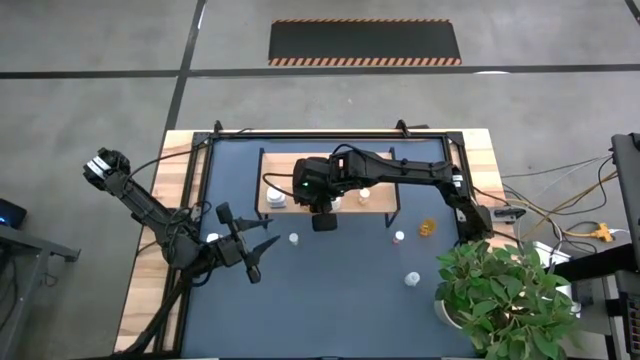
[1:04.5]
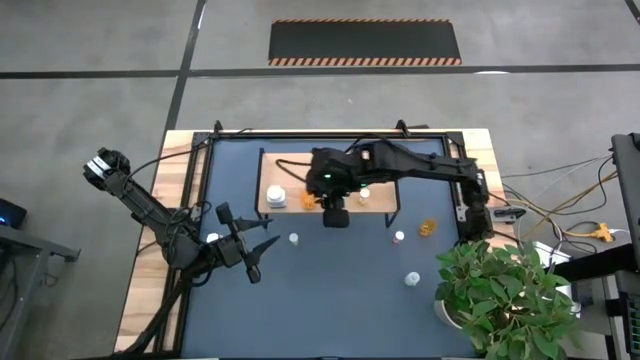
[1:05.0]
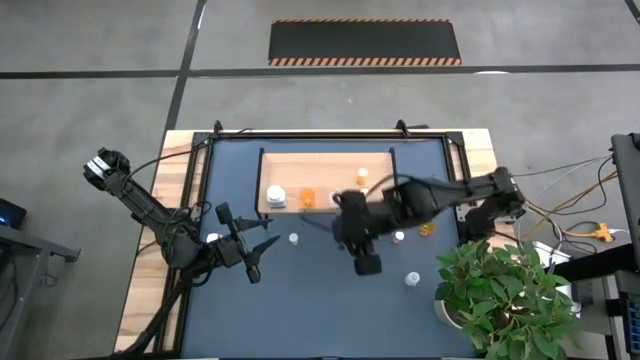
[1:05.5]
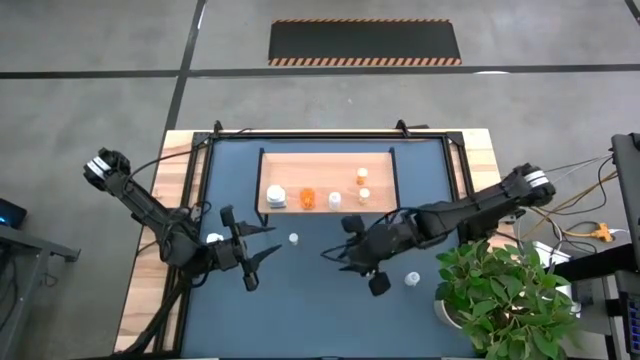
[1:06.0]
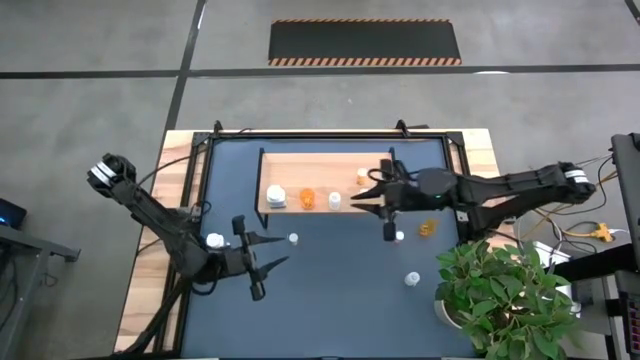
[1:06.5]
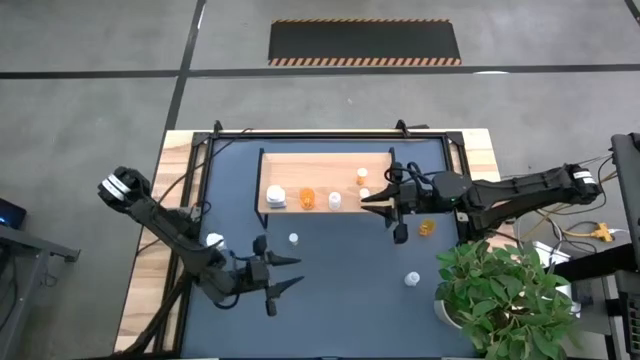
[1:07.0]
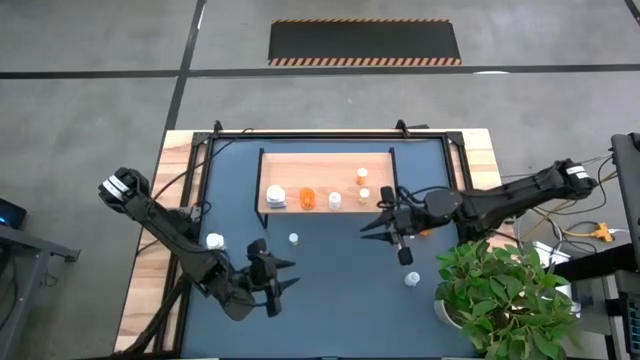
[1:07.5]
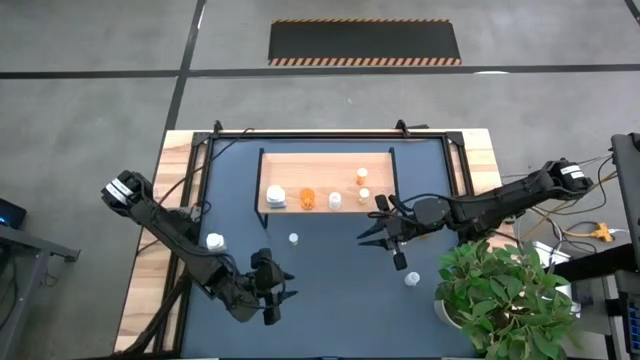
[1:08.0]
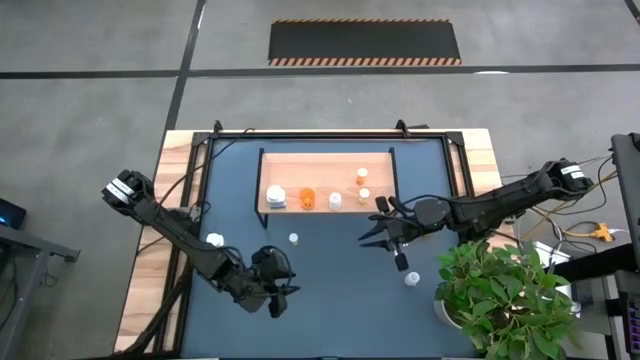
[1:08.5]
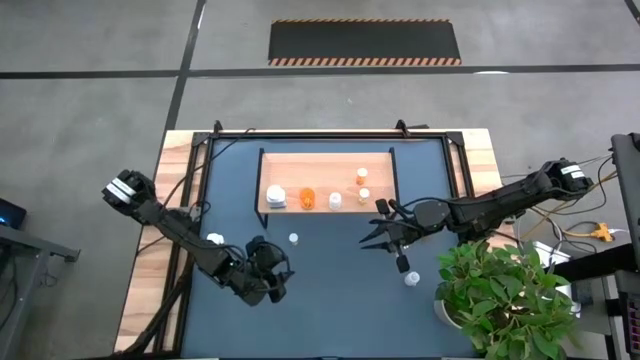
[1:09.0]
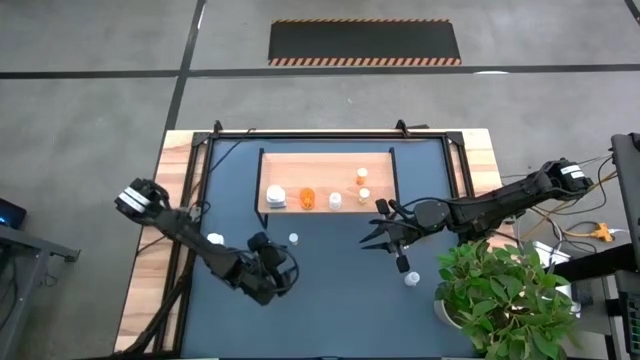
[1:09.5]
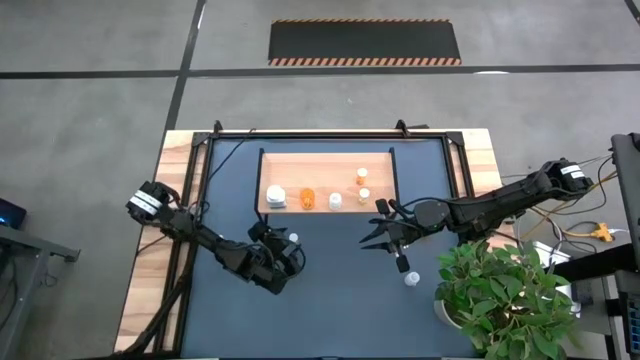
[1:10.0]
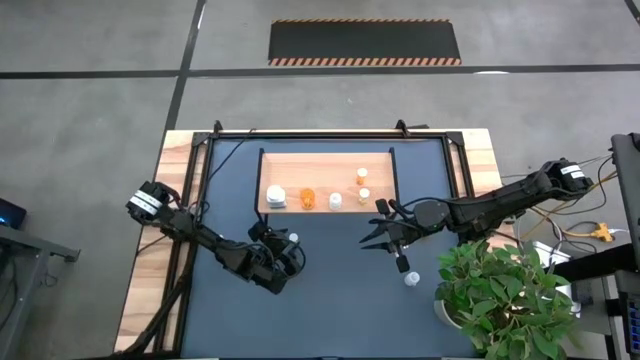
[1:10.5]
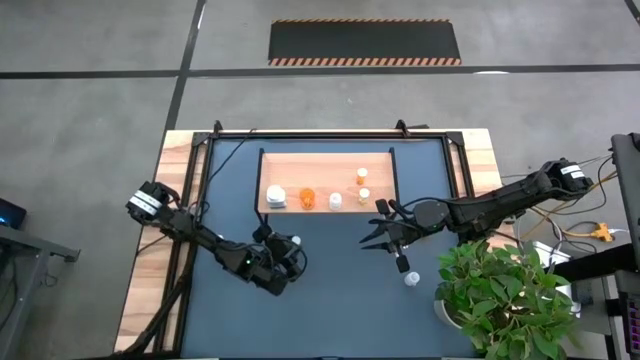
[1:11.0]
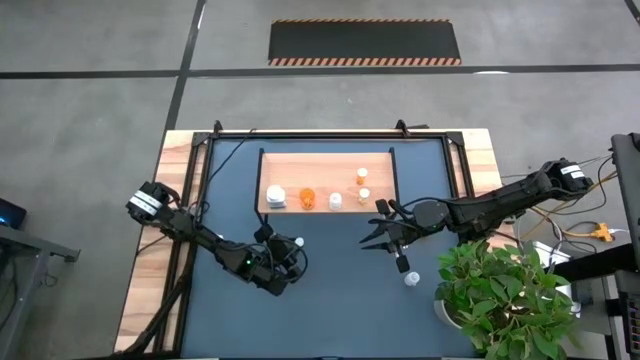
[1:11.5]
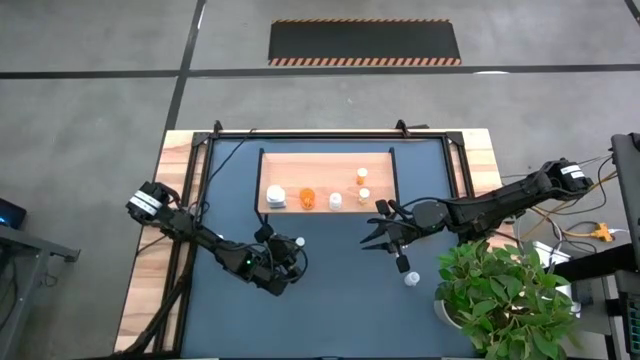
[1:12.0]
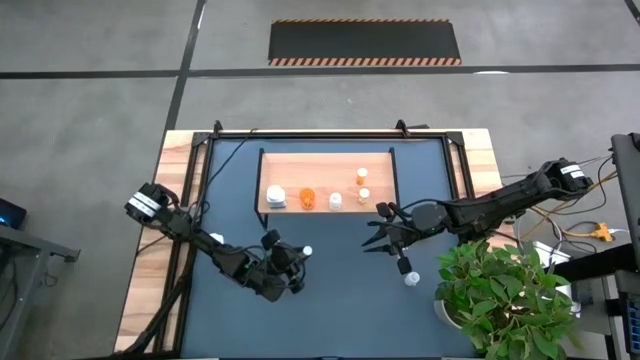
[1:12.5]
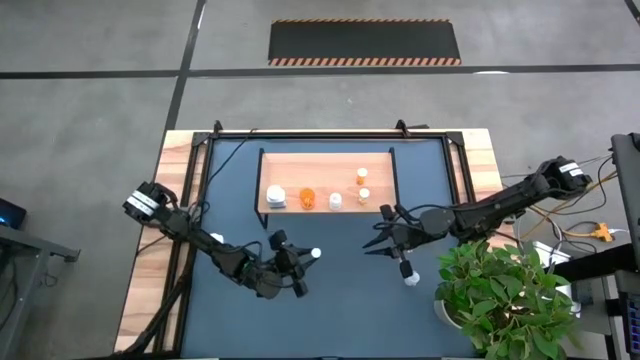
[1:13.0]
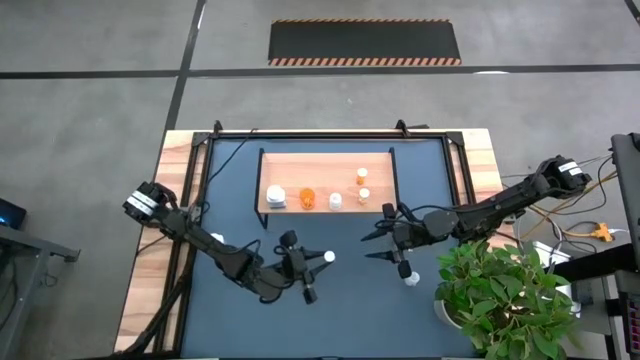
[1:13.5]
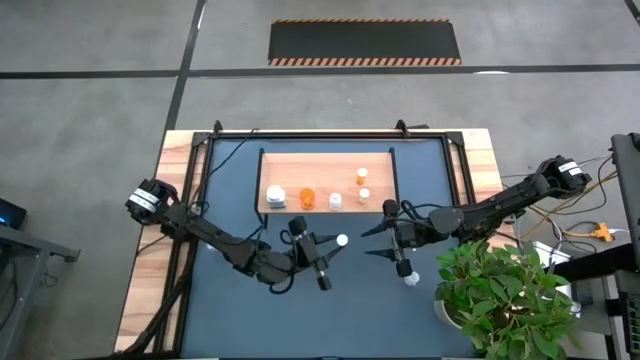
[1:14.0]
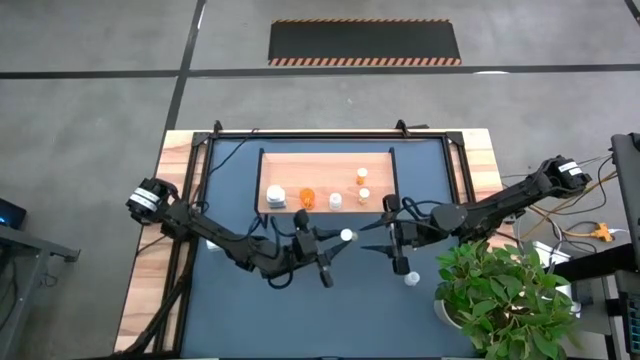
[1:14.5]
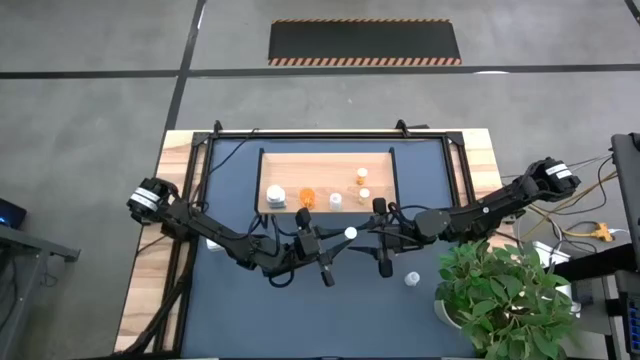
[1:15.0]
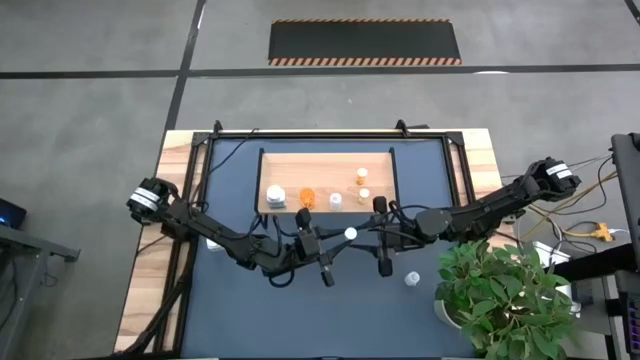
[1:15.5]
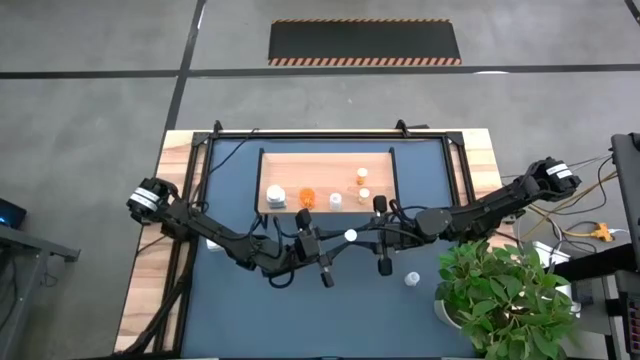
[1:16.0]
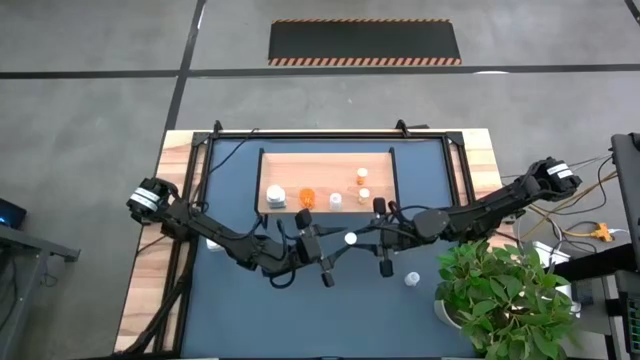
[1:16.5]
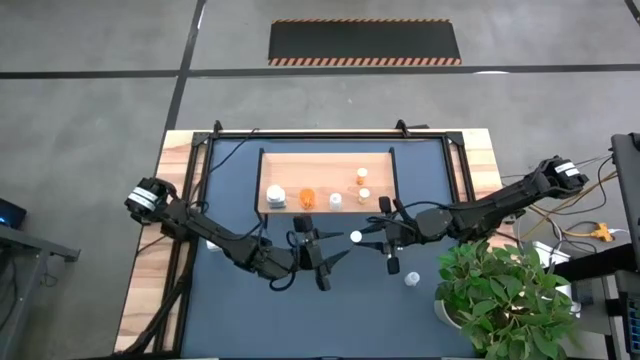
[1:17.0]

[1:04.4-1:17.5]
Task: Pick and place medicine bottles onto shelf by color
Put the yellow bottle on the shelf aligned

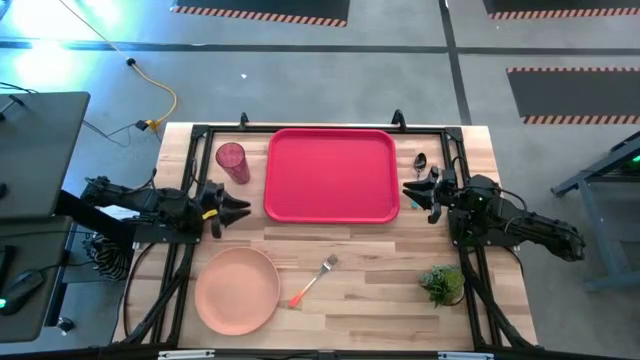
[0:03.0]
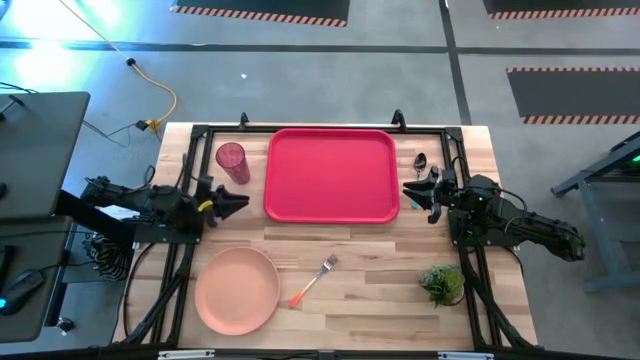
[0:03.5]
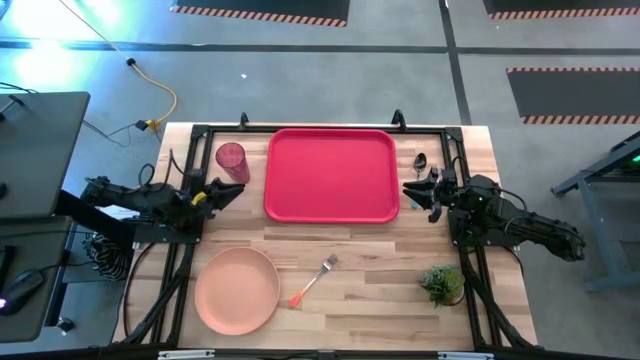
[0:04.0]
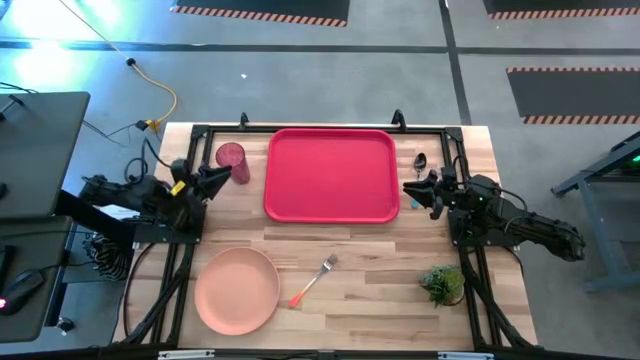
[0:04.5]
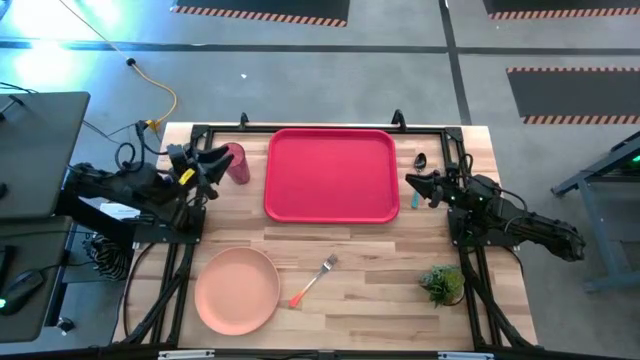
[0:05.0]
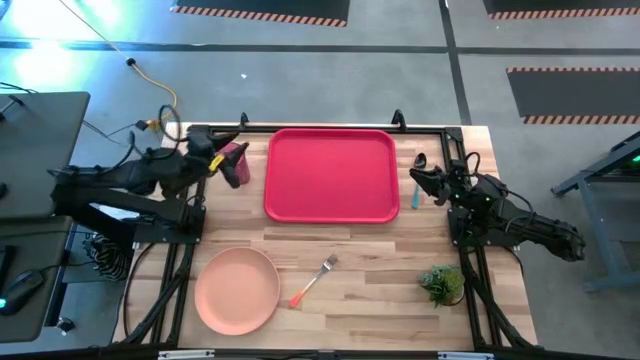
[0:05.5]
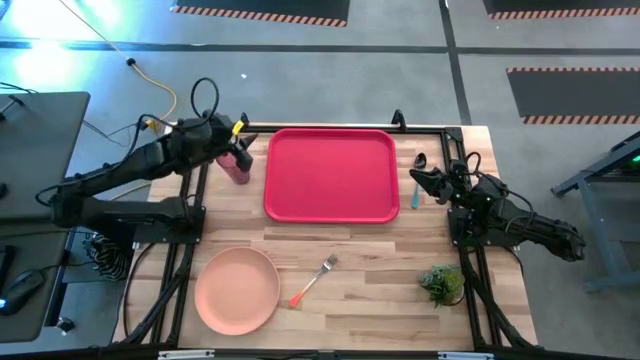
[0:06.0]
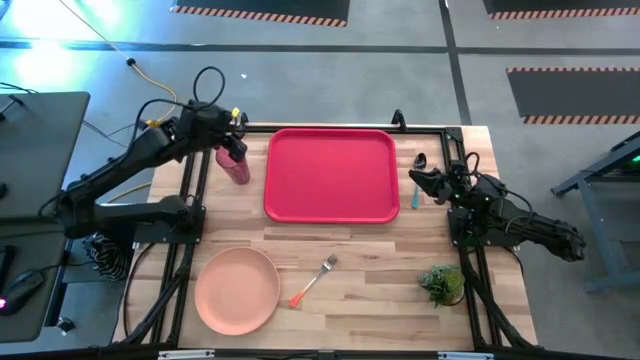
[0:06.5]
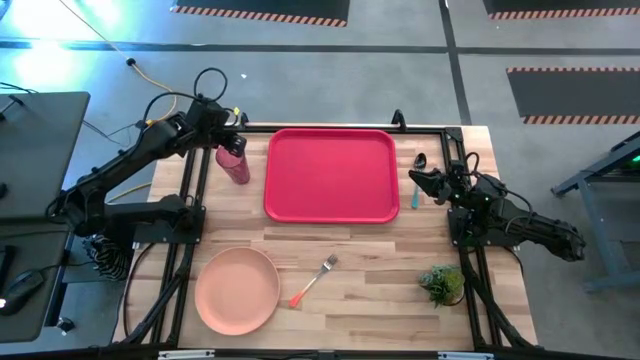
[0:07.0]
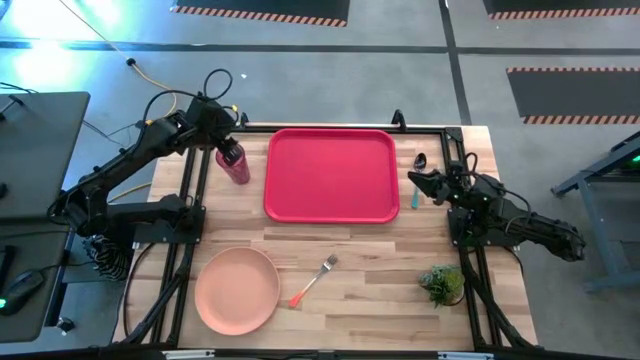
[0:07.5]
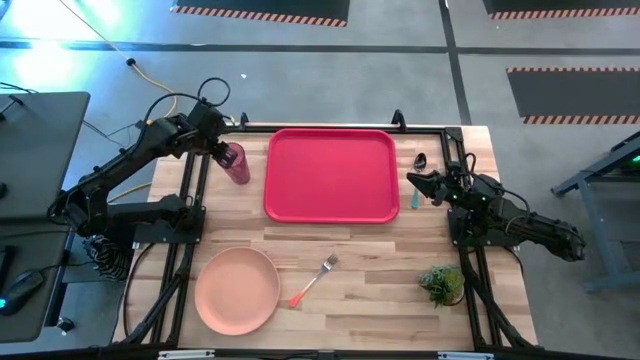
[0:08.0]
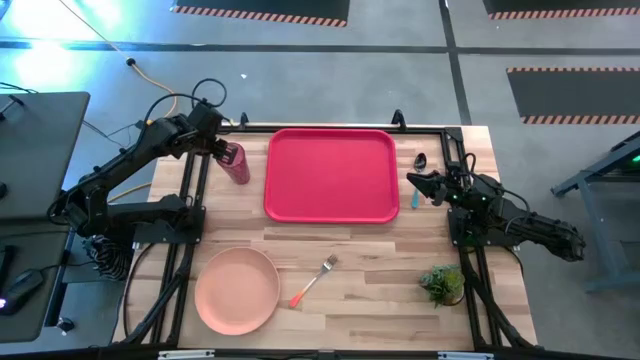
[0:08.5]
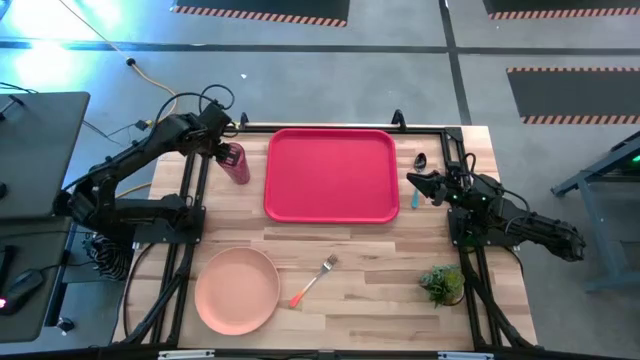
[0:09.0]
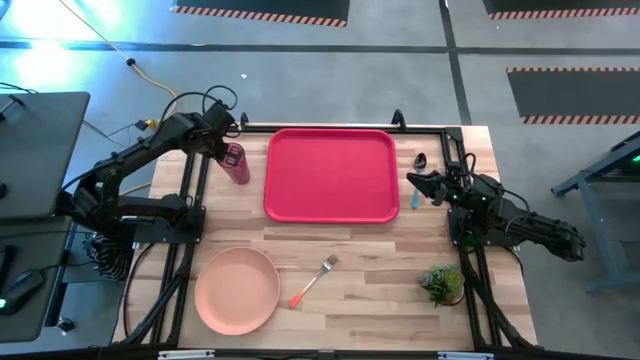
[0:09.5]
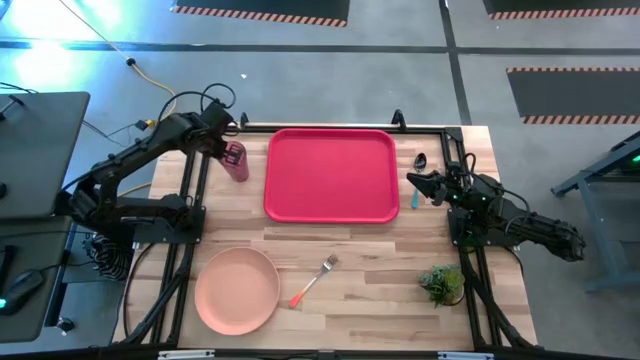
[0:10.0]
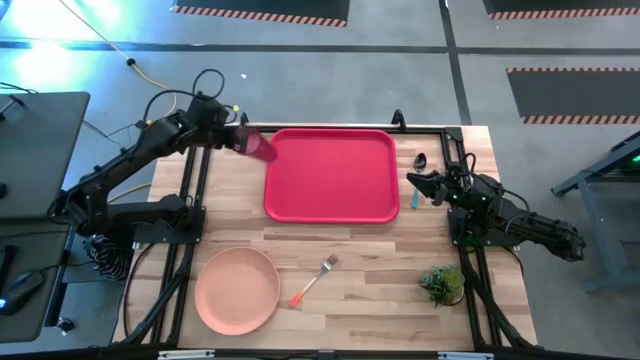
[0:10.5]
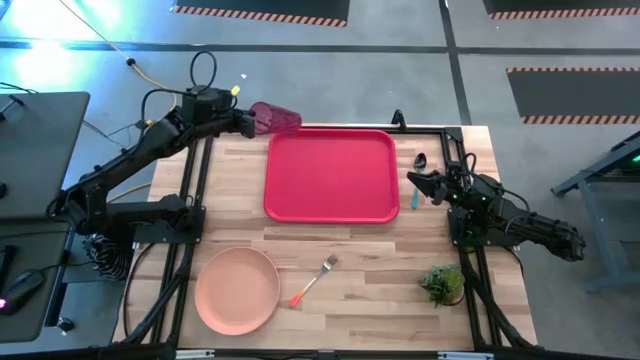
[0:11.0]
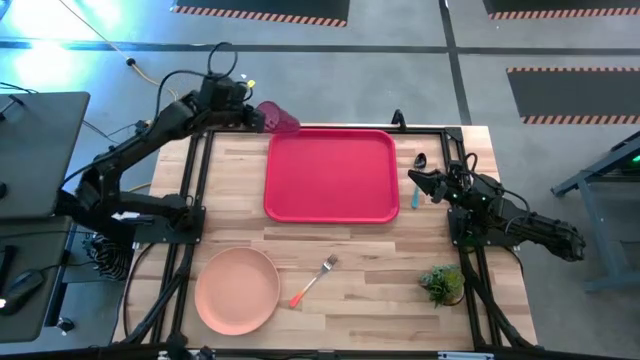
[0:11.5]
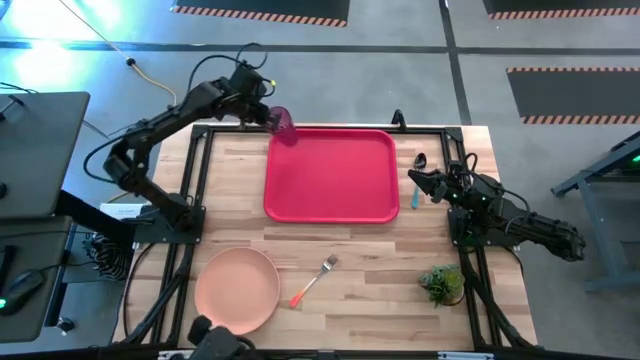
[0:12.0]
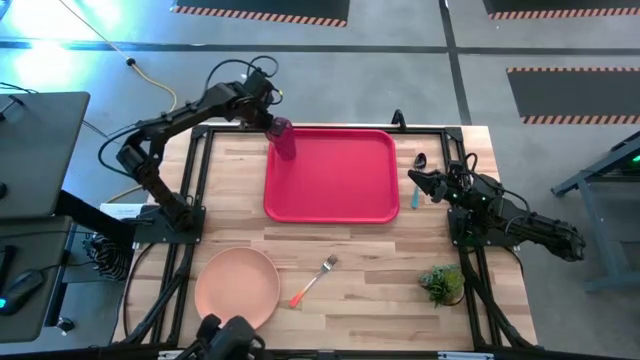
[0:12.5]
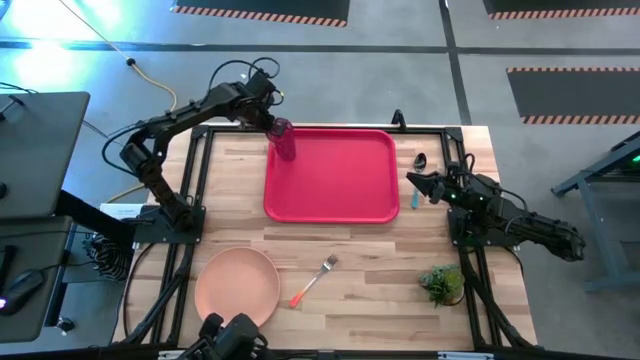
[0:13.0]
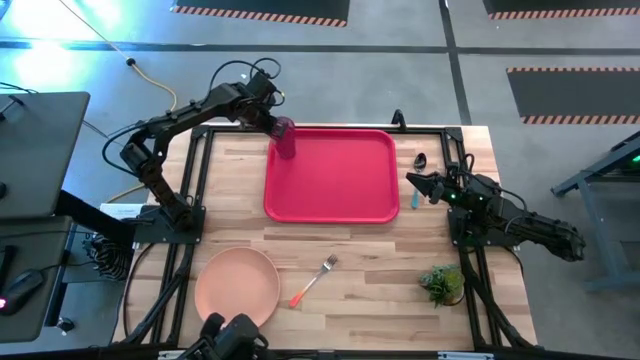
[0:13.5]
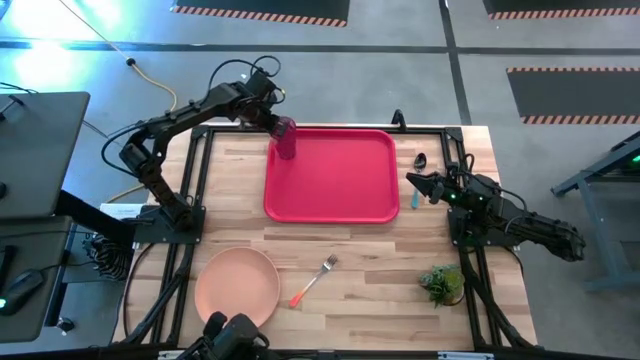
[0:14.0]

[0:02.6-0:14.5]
Task: Pick and place plate/cup/fork/spoon on tray
Put the pink cup to the top left side of the red serving tray
